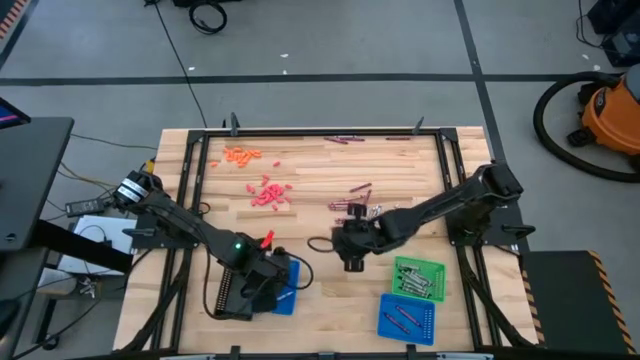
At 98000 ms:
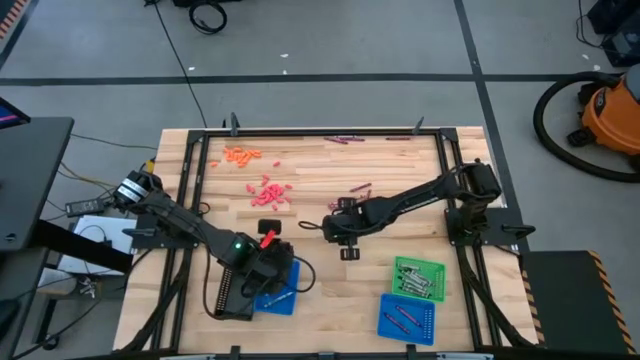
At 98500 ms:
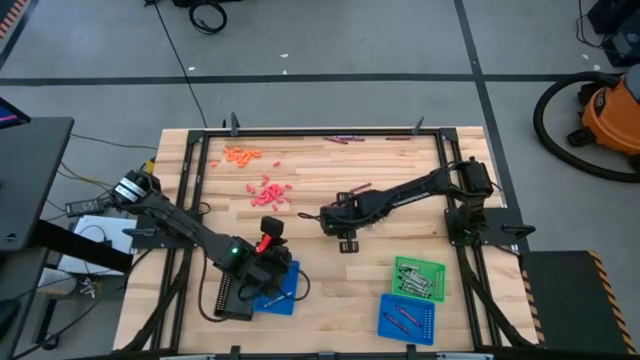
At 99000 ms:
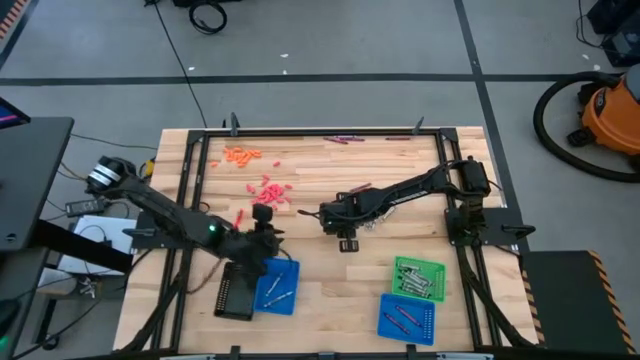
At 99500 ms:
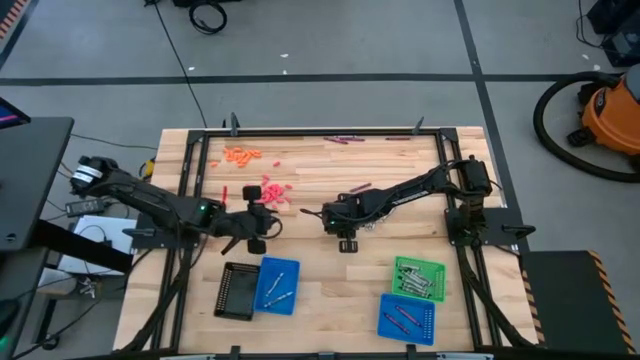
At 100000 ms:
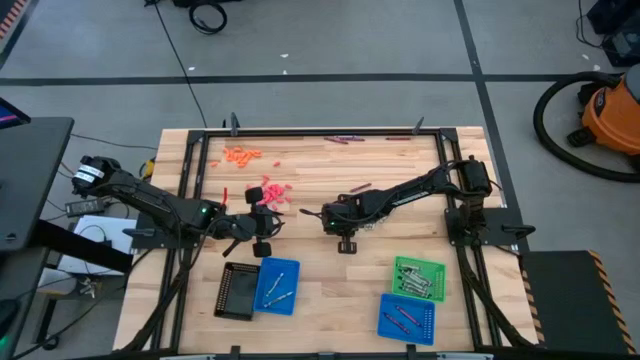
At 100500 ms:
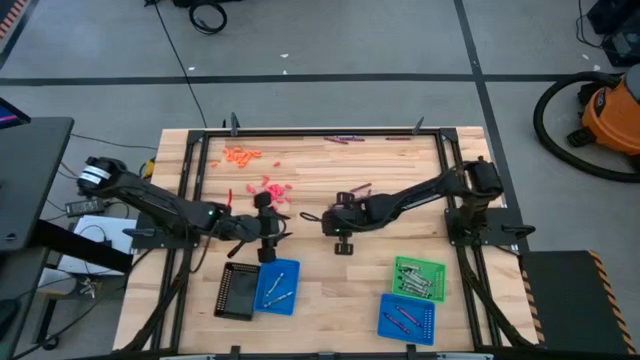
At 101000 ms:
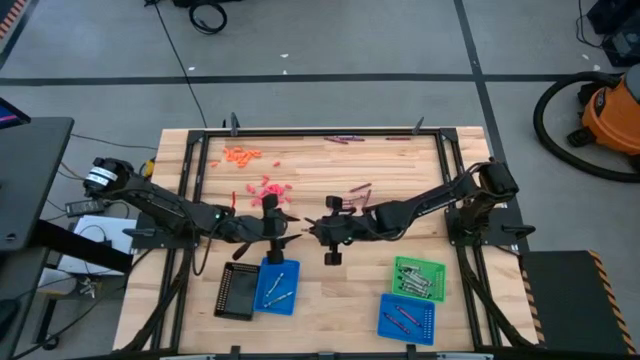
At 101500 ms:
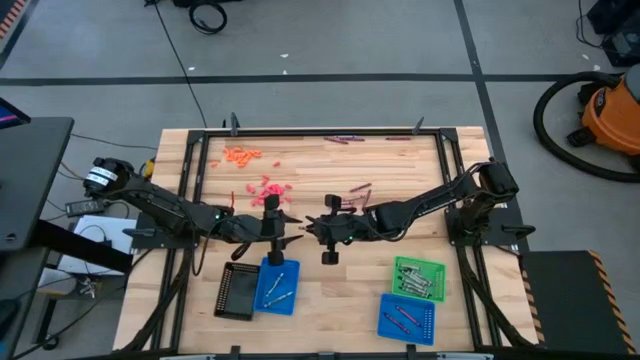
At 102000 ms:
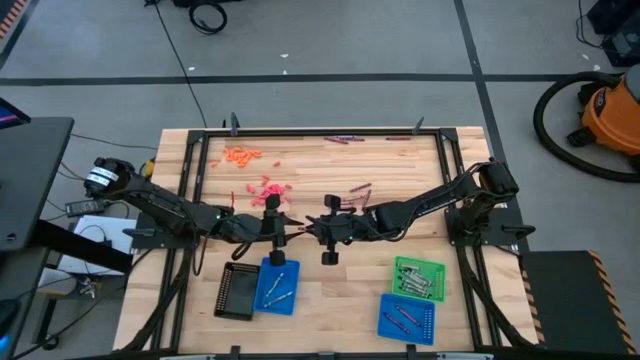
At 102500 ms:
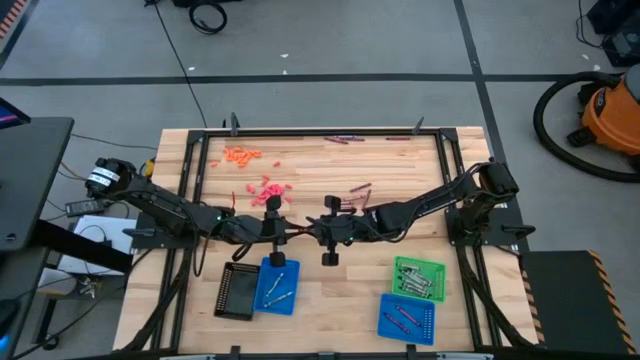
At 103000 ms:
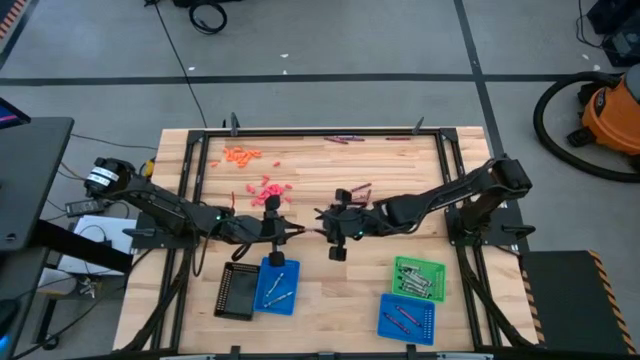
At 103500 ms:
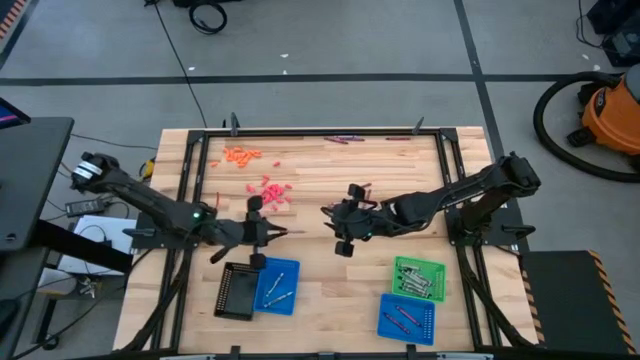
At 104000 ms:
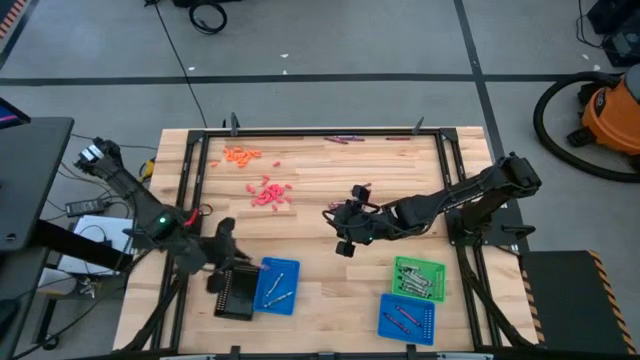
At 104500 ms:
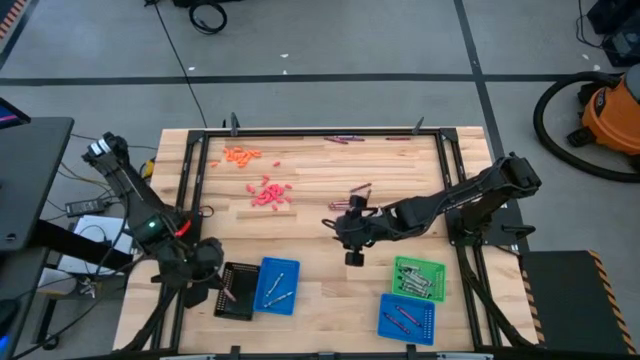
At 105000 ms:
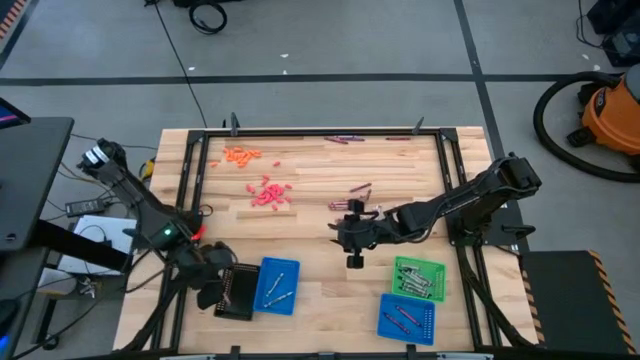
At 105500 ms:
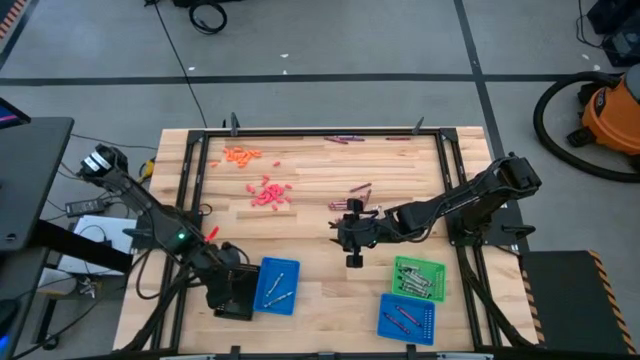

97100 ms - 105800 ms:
Task: Sort crayons
Put the pink crayon into the black bin

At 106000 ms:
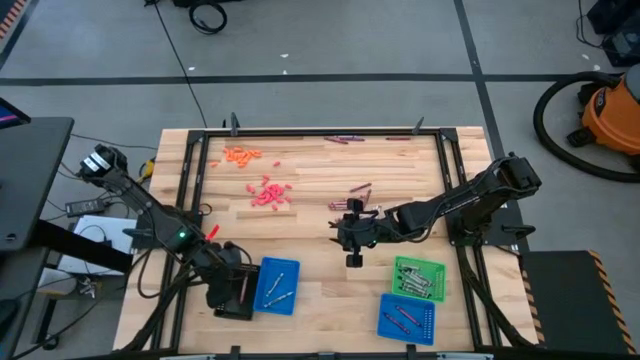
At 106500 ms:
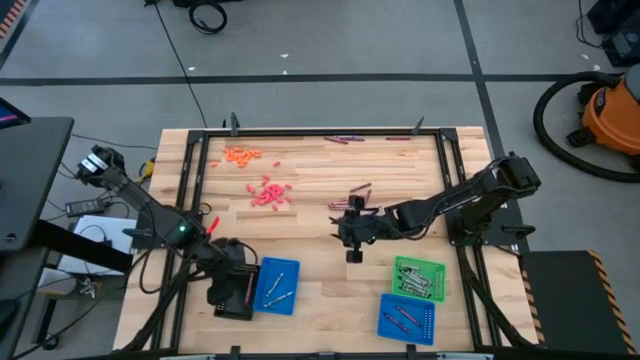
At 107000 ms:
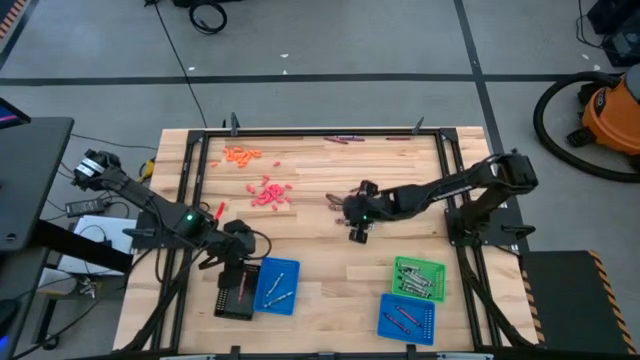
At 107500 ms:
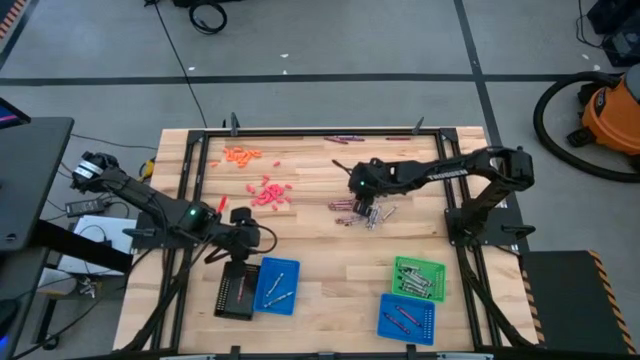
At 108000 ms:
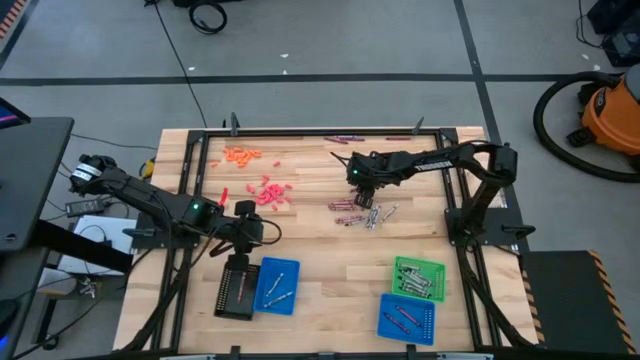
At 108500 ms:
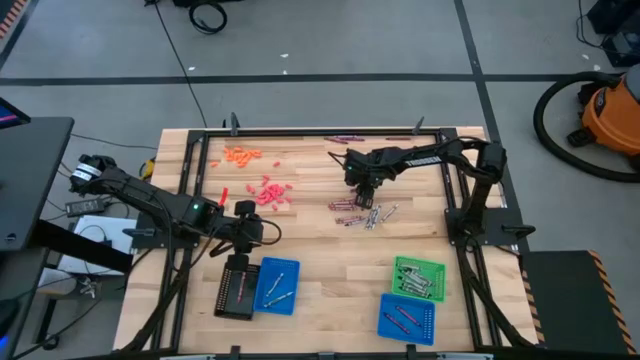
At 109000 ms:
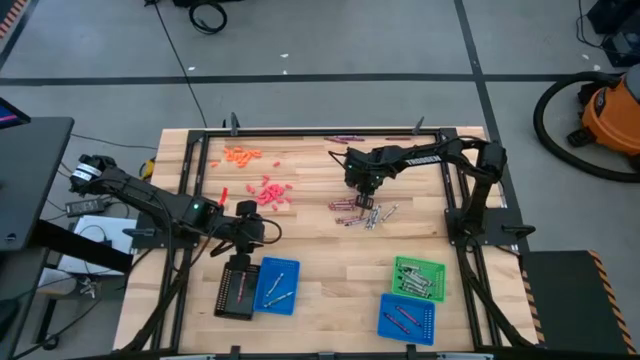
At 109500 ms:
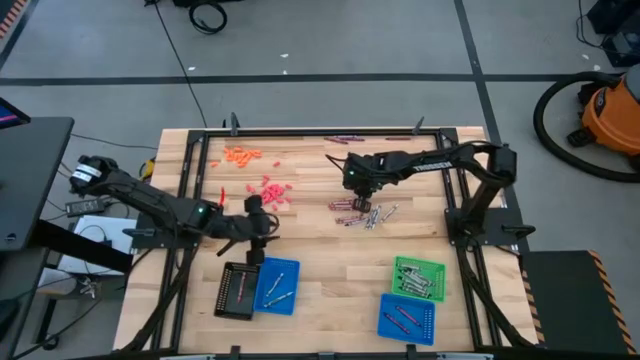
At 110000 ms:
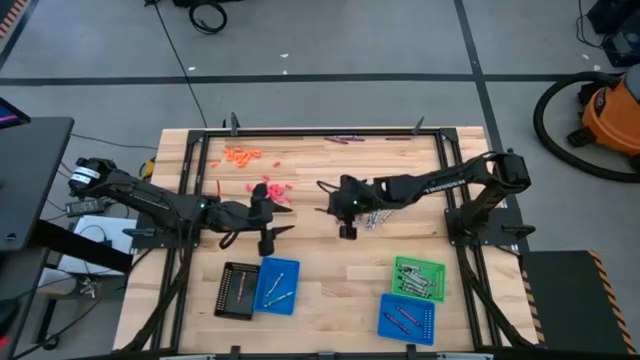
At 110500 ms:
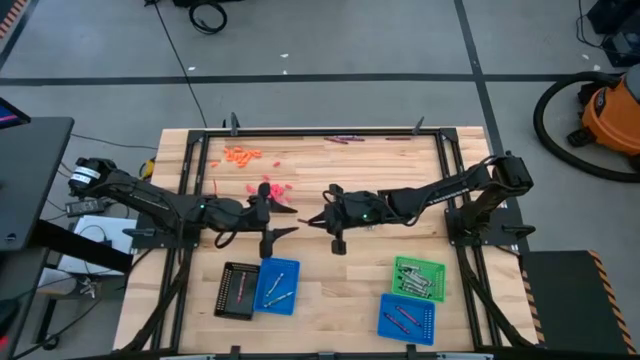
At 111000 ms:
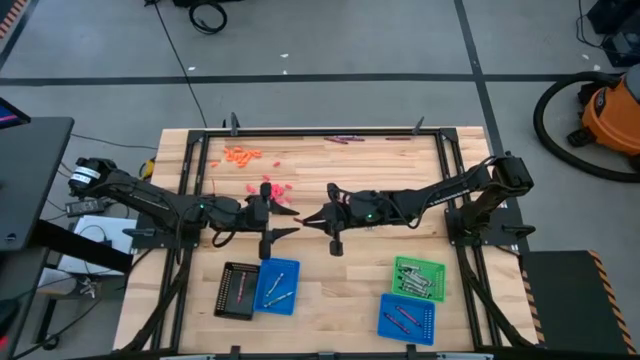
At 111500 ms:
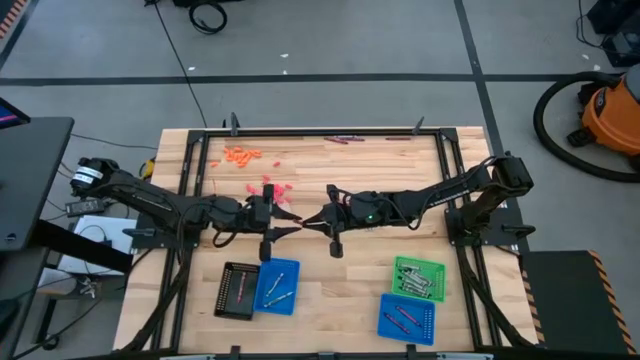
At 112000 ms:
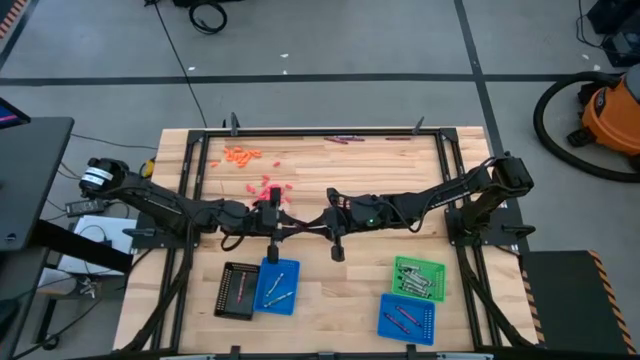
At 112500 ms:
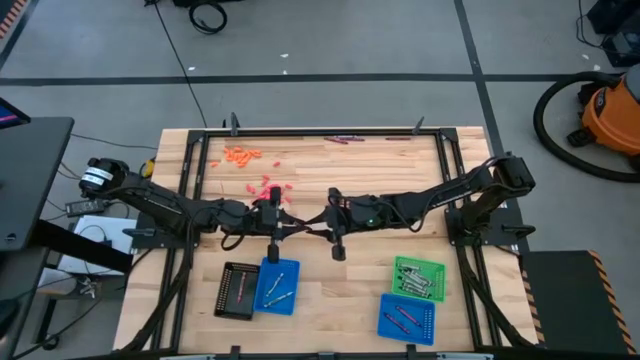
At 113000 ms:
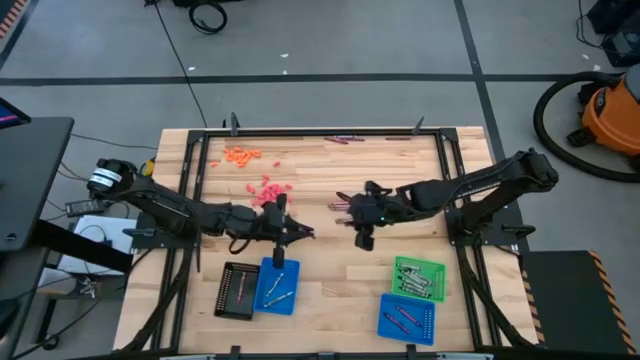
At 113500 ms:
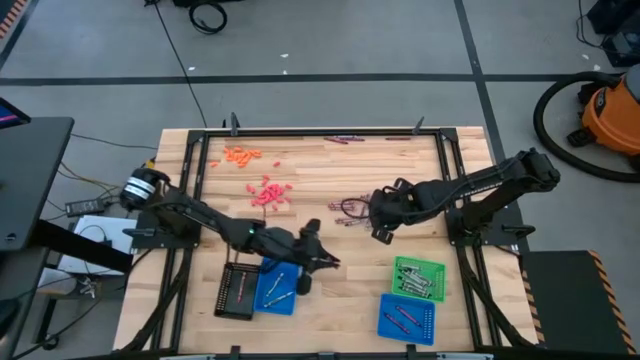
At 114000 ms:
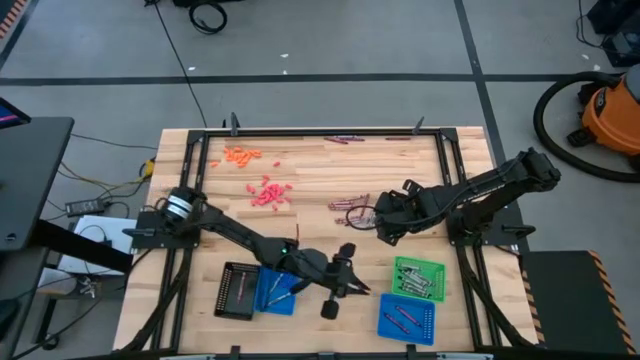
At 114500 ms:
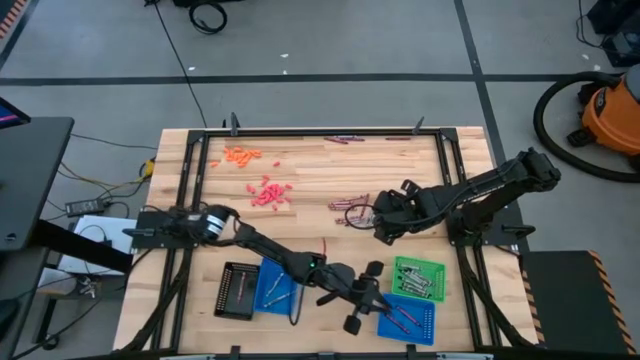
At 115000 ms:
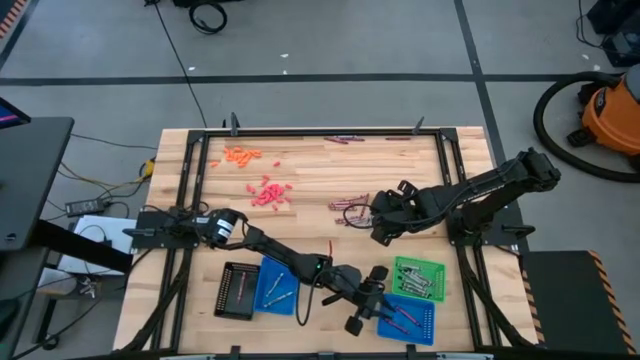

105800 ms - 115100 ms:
Put the red crayon into the right blue bin

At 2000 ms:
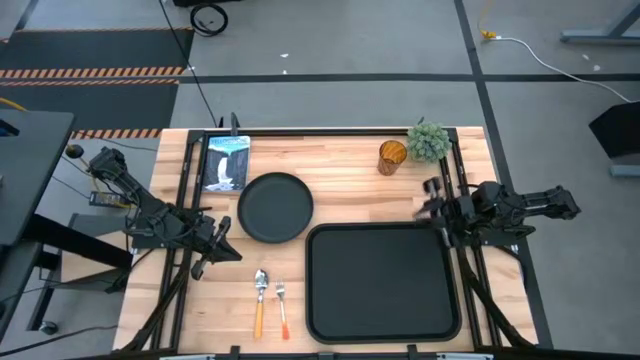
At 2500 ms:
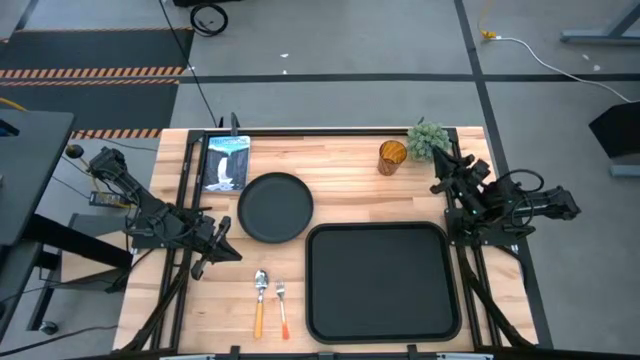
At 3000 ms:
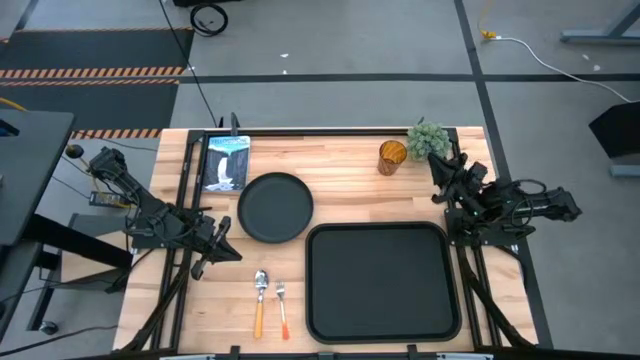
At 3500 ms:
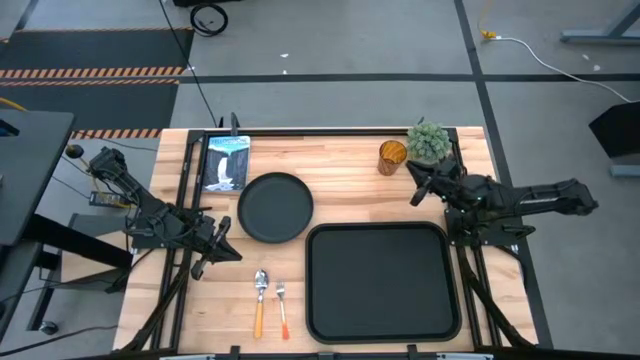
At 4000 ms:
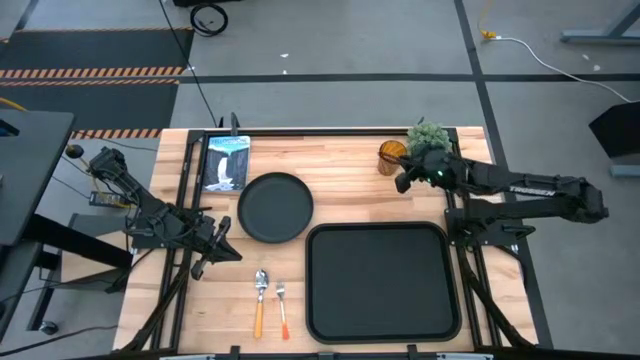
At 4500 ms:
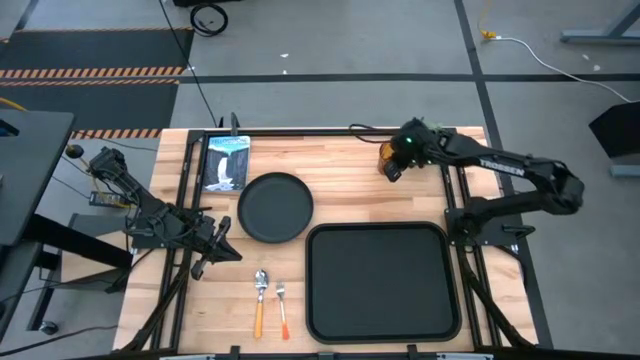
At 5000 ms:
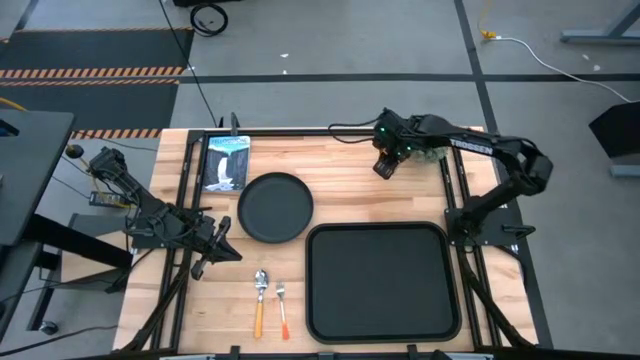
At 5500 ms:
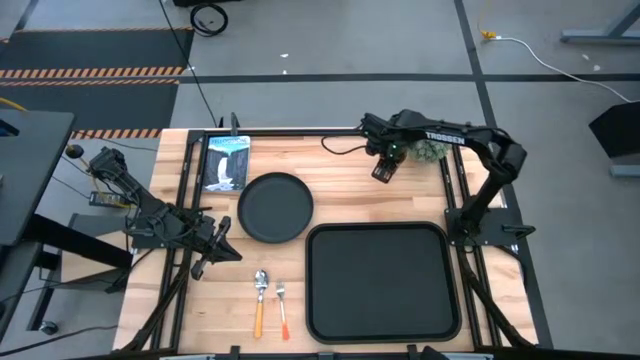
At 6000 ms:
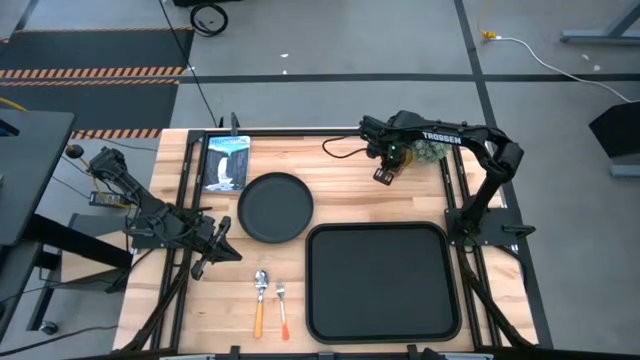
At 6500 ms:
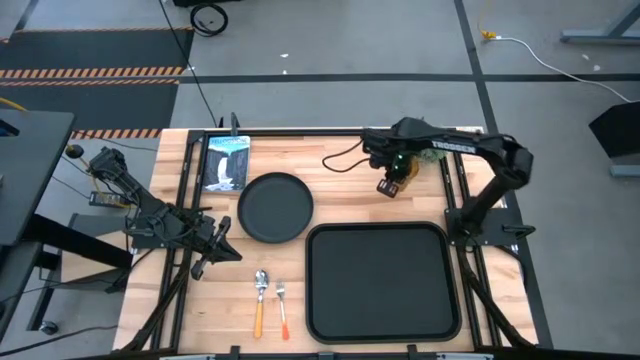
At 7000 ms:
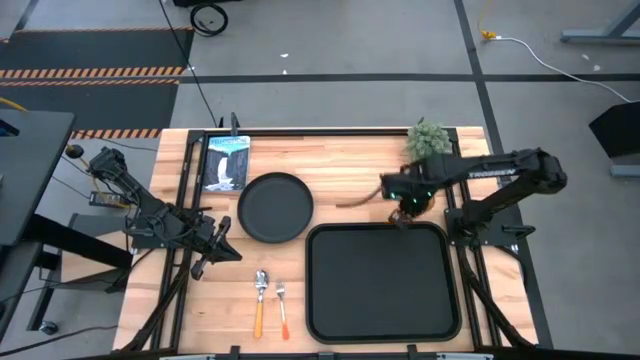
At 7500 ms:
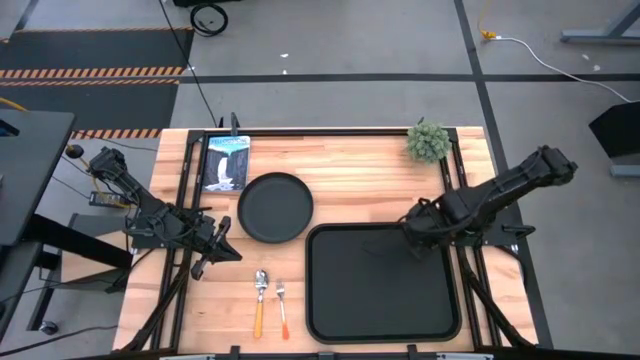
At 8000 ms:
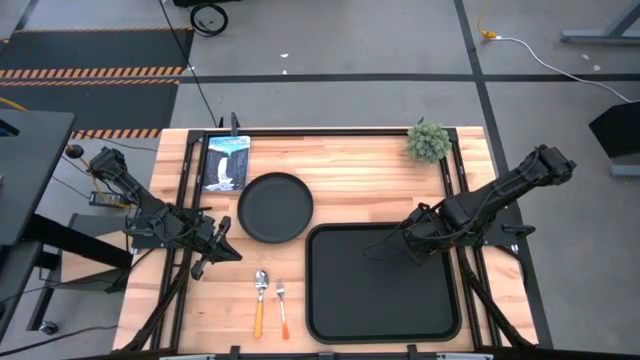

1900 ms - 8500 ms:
Task: Pick and place plate/cup/fork/spoon on tray
Put the brown glass on the black tray
